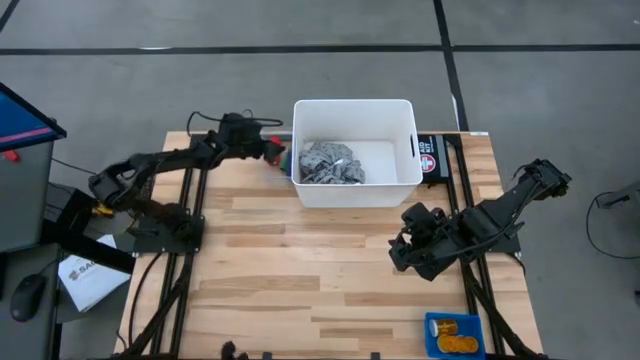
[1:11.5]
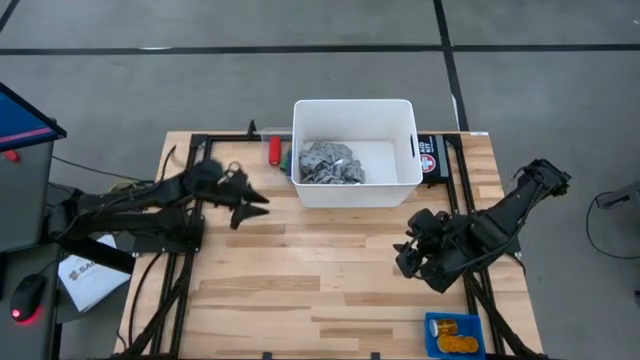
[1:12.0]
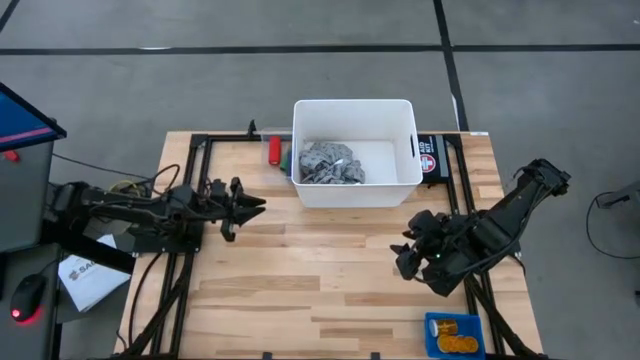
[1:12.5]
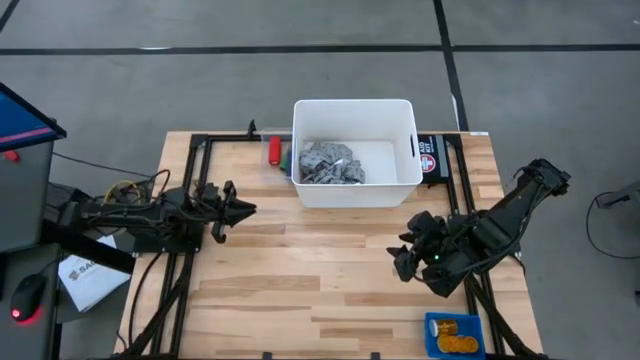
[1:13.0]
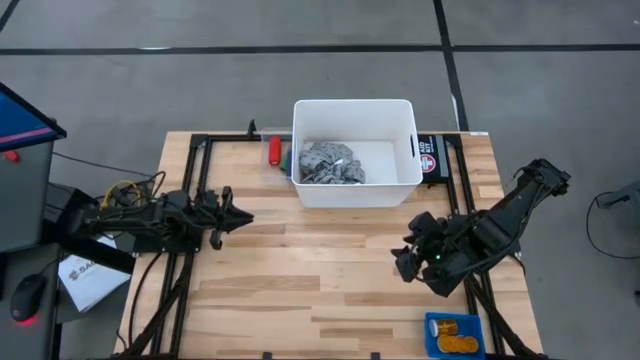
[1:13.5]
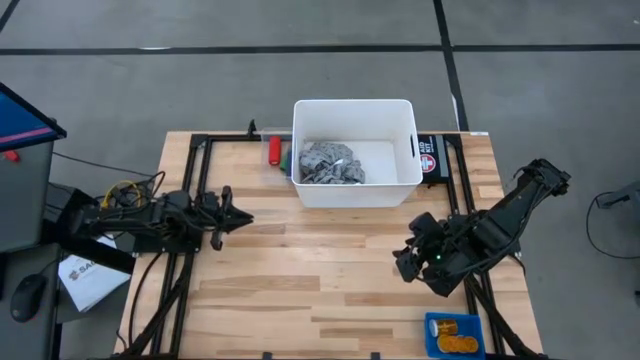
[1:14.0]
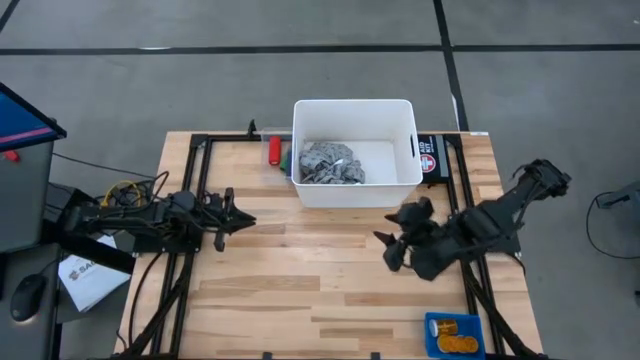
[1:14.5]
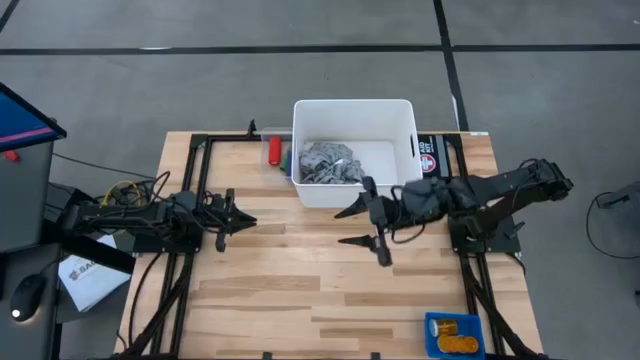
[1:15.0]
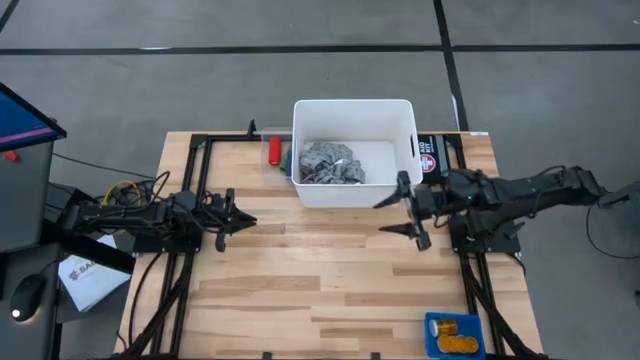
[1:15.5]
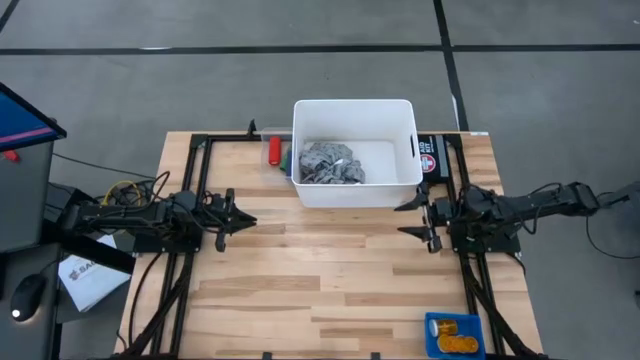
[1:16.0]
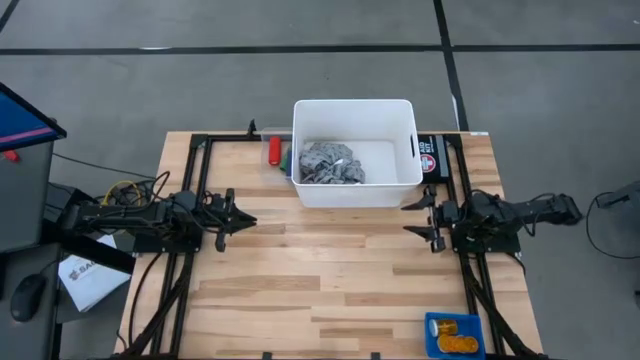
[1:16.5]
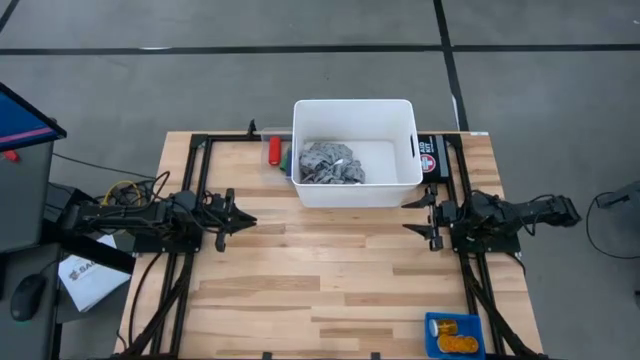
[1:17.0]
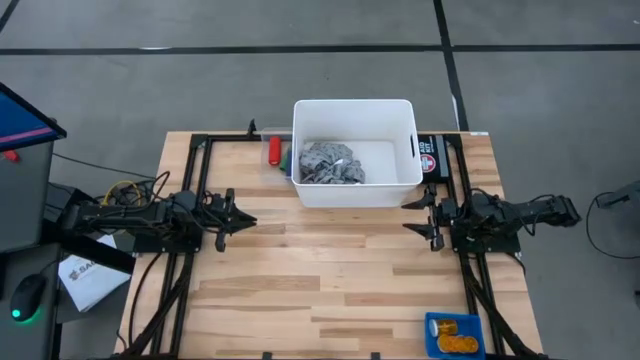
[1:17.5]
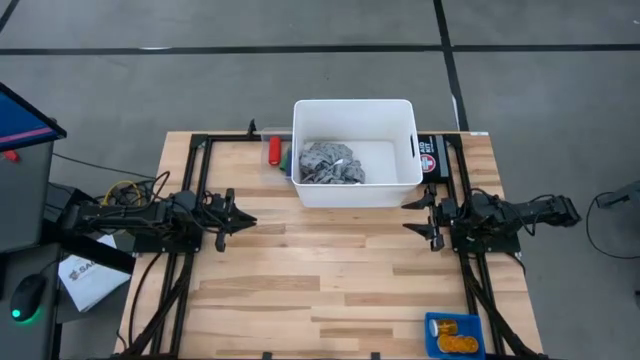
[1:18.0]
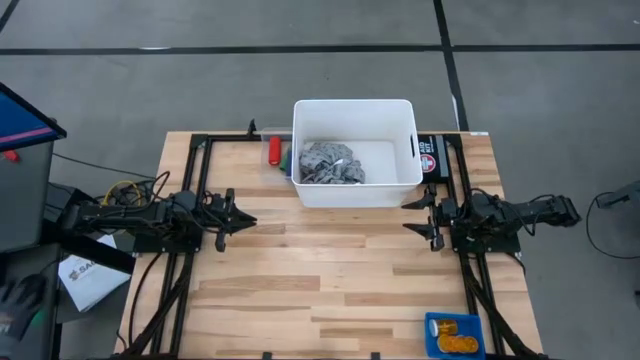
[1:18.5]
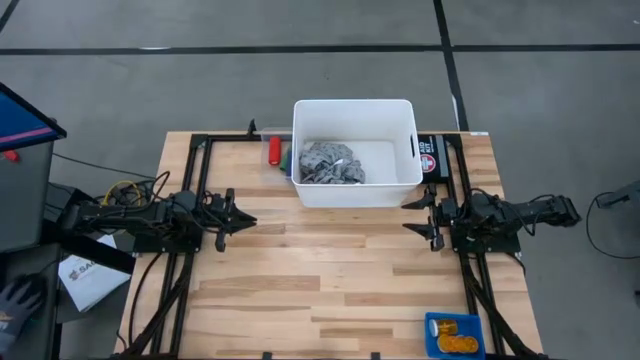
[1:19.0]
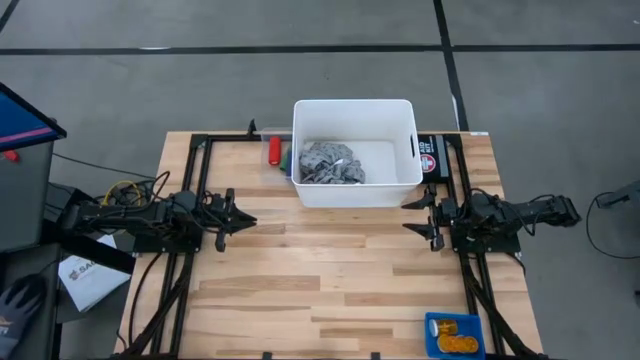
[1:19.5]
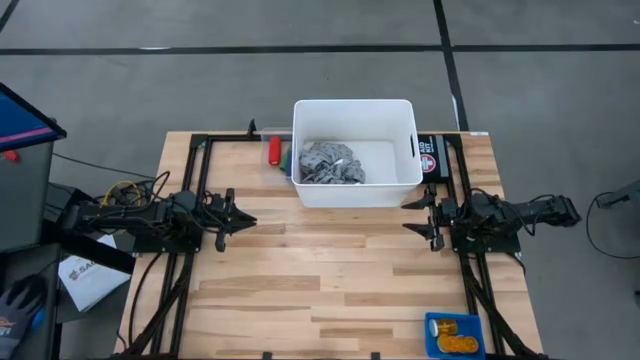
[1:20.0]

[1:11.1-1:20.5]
Task: Pick & Place Medicine items
Return to Home Position

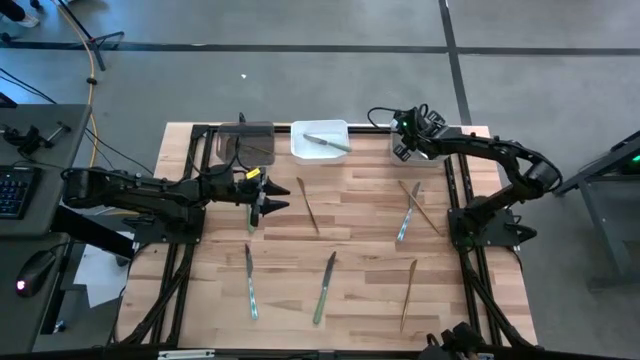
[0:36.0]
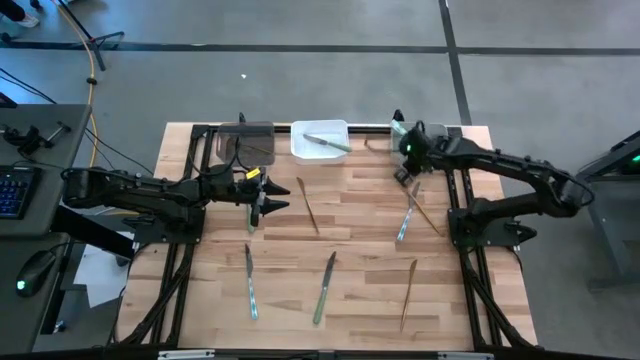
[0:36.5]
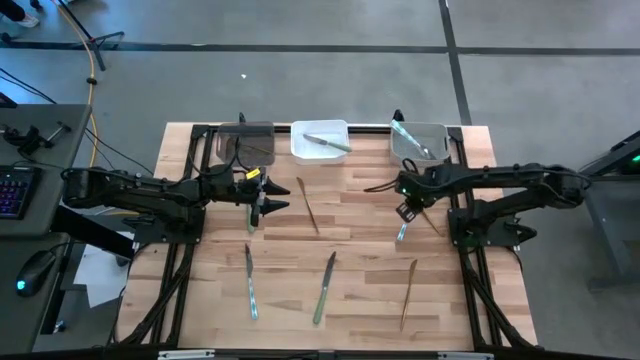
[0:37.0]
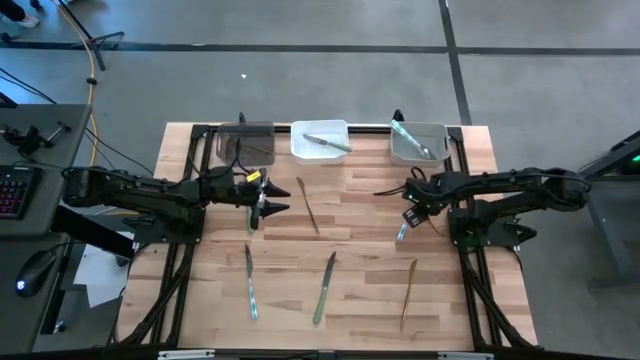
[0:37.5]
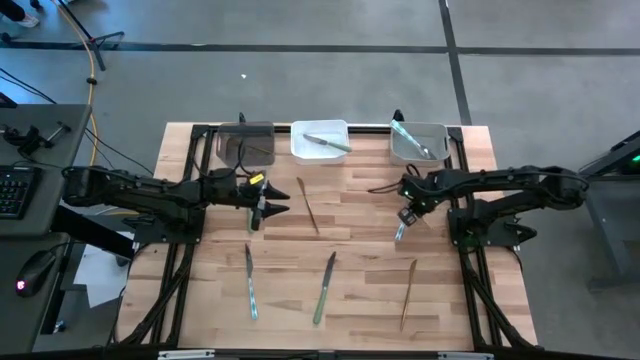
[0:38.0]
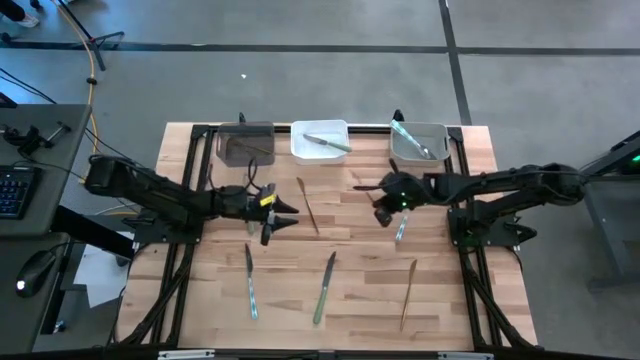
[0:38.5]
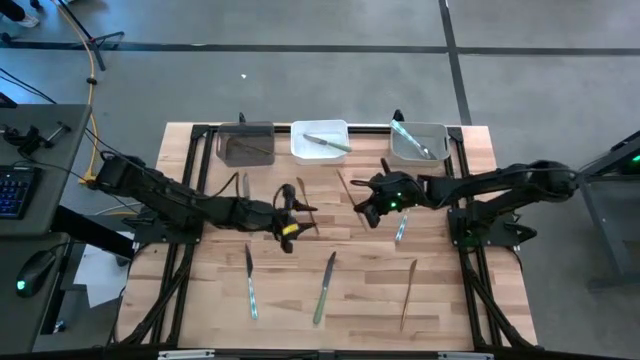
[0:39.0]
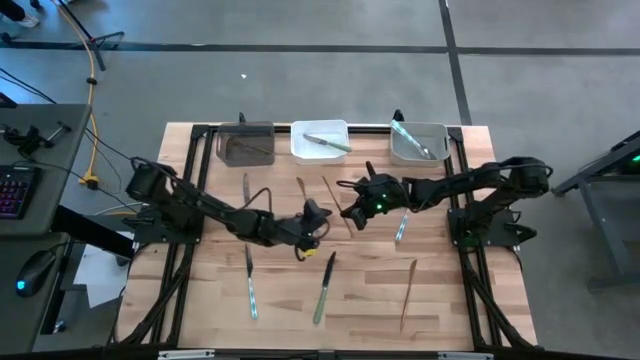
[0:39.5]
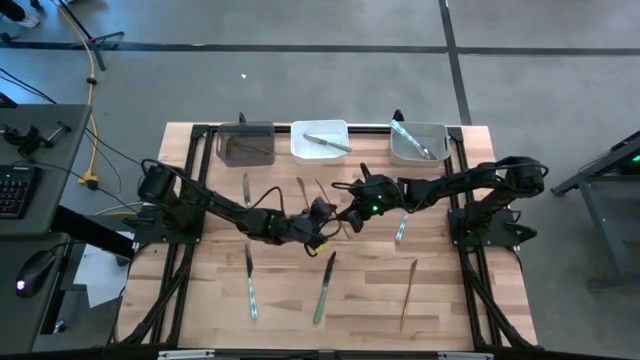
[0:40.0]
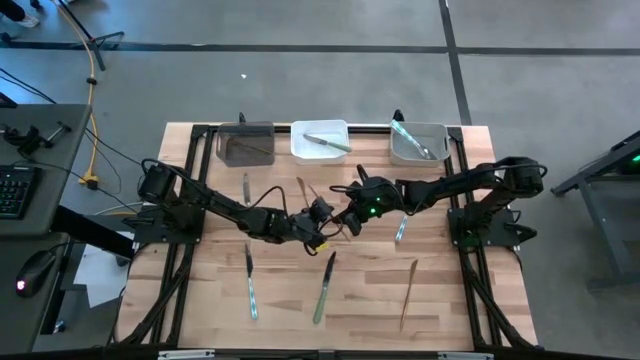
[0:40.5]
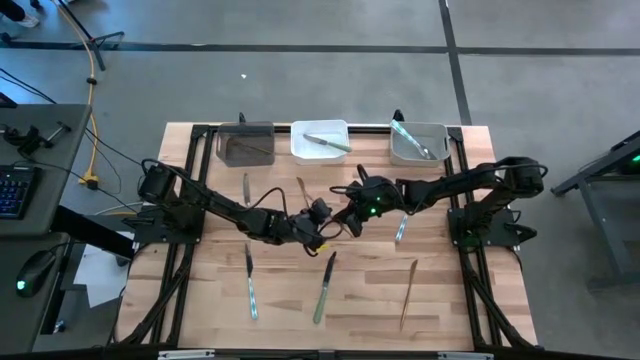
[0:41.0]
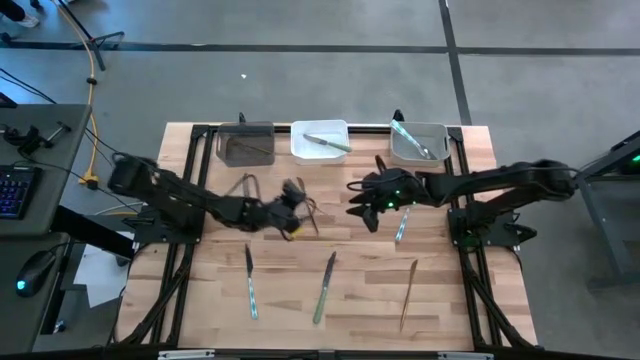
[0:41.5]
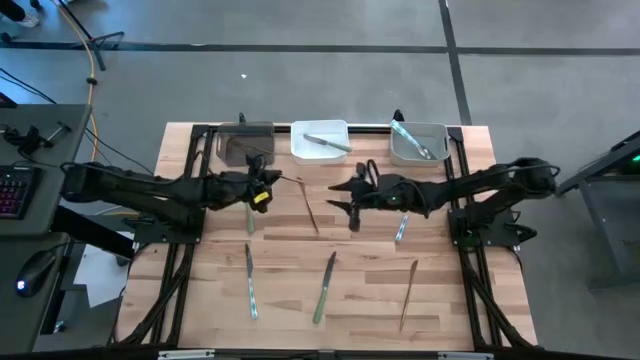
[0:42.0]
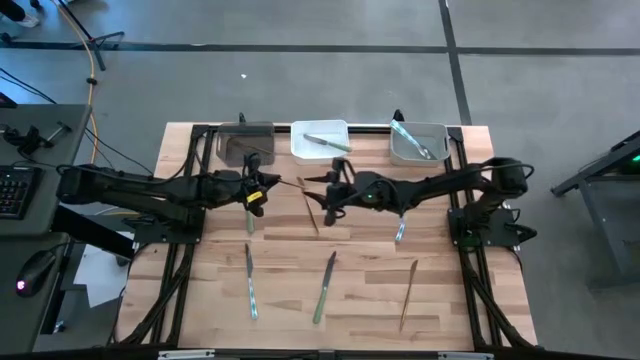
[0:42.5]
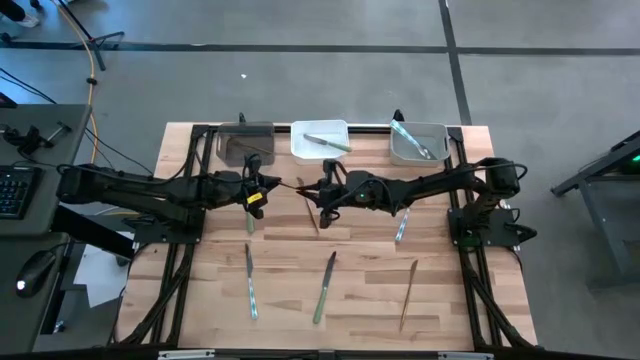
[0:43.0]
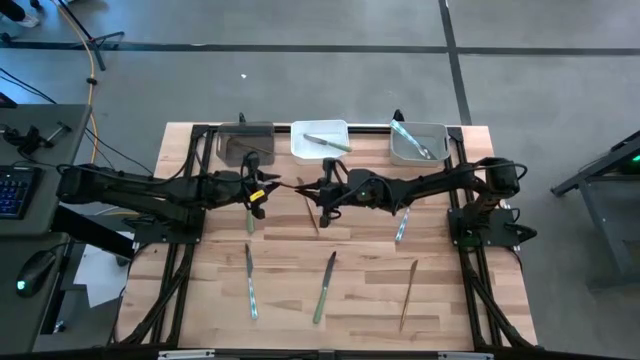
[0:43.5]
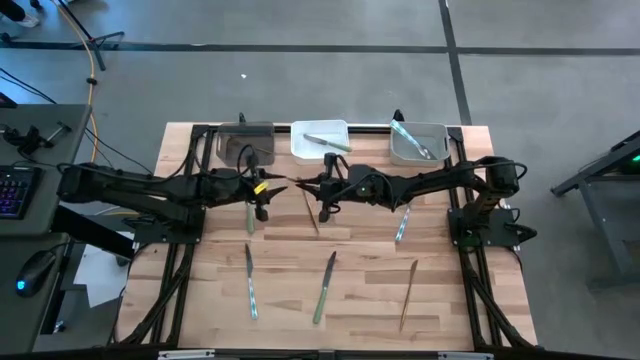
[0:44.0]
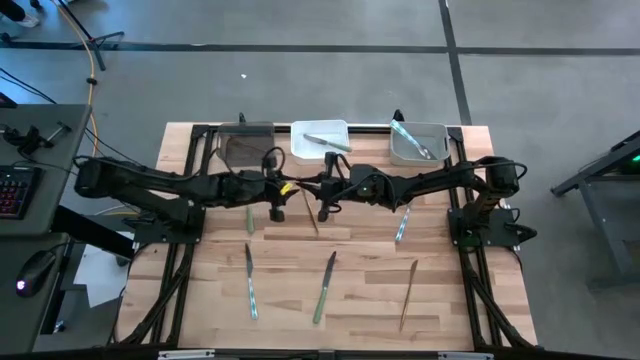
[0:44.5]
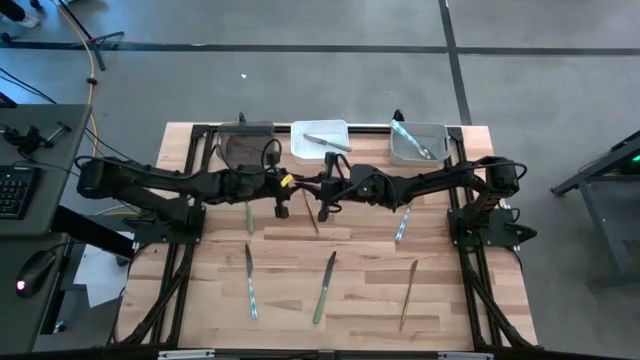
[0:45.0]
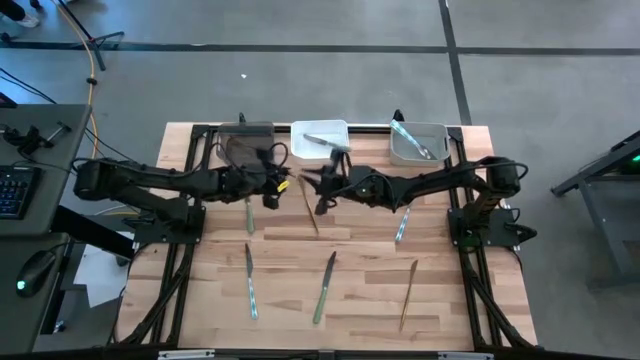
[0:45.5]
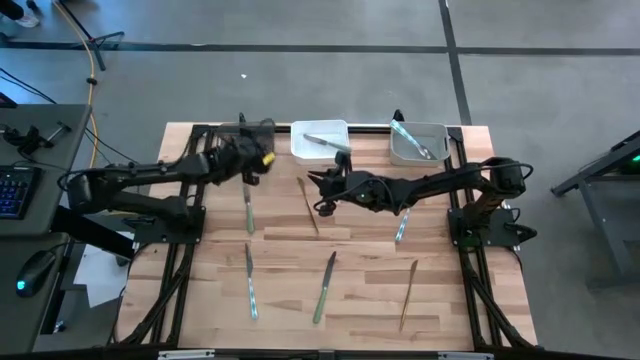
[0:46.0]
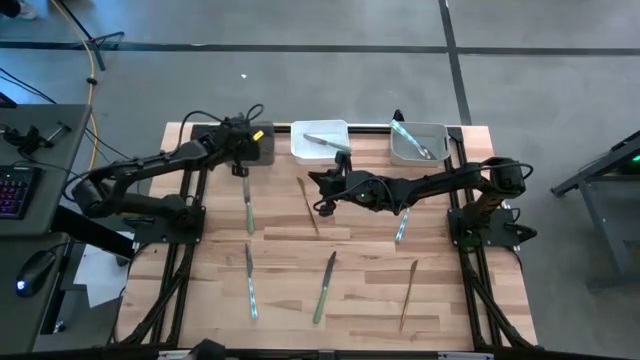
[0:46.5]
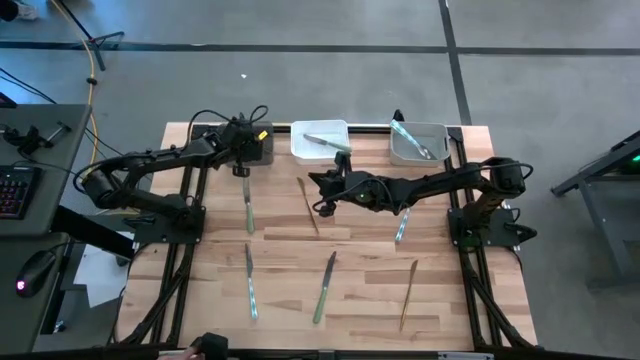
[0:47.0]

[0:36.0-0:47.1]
Task: Sort silverware by color (type)
Put the gold knife into the black bin
